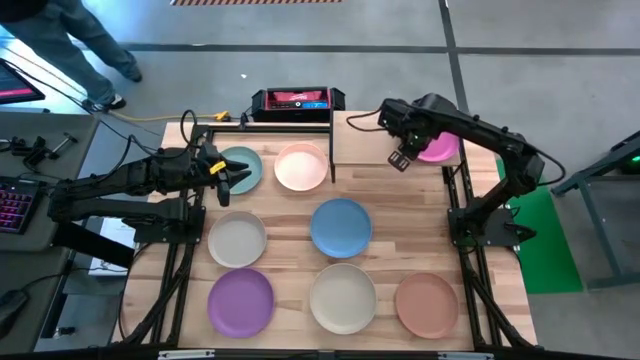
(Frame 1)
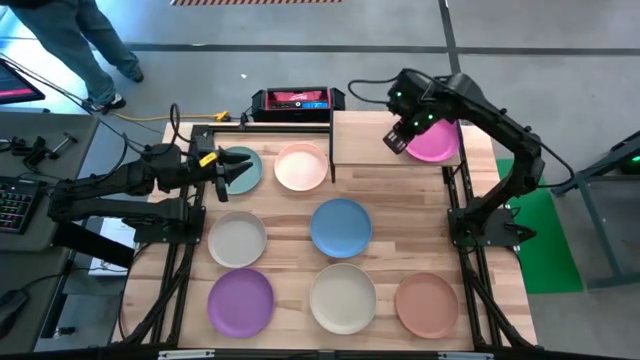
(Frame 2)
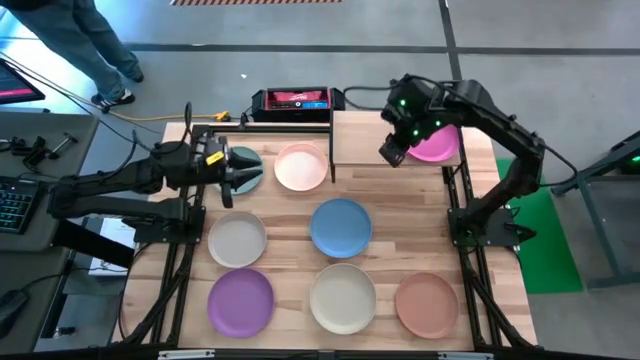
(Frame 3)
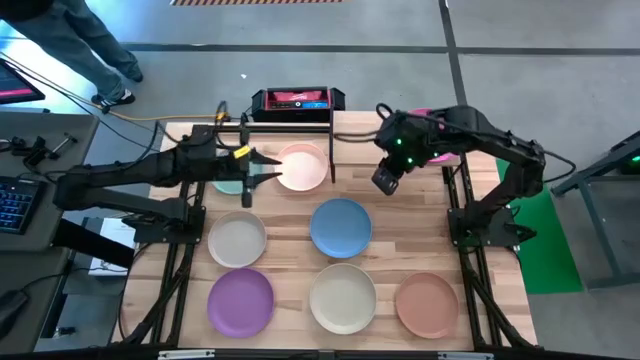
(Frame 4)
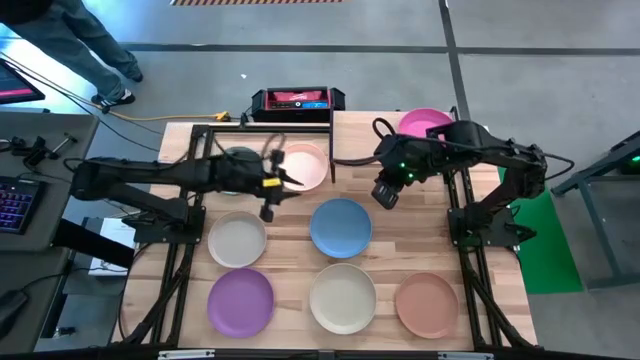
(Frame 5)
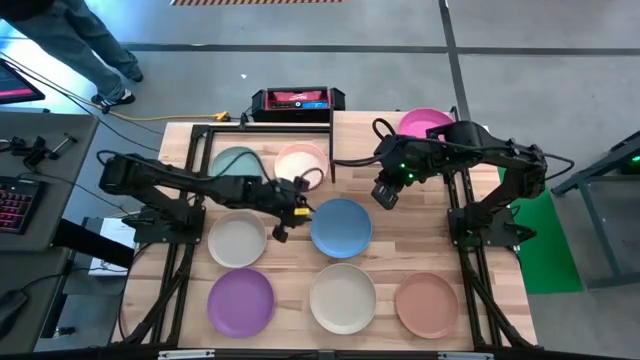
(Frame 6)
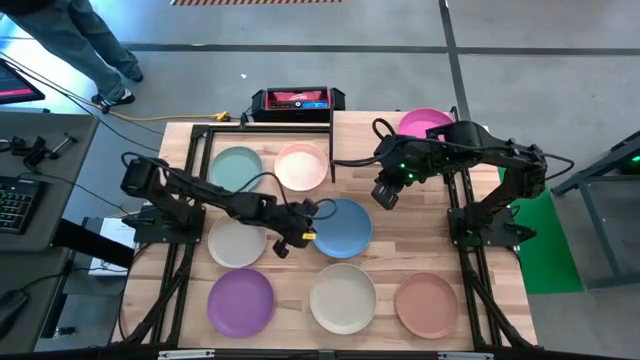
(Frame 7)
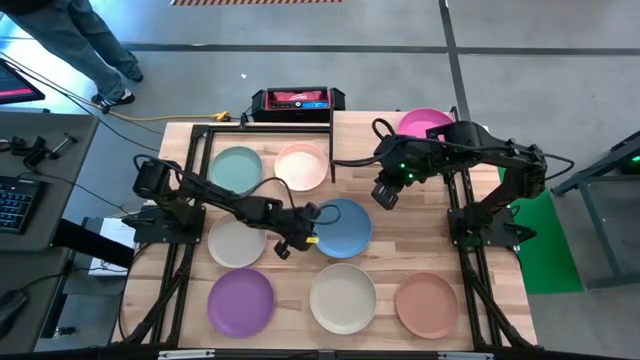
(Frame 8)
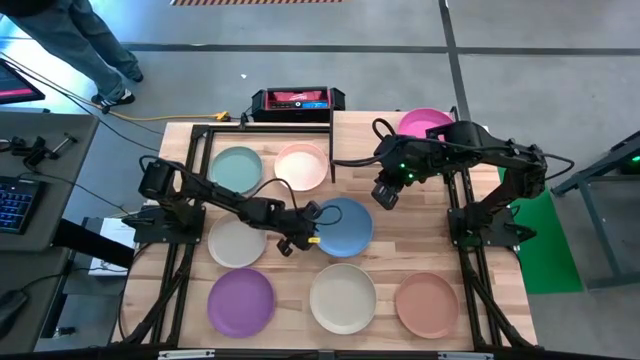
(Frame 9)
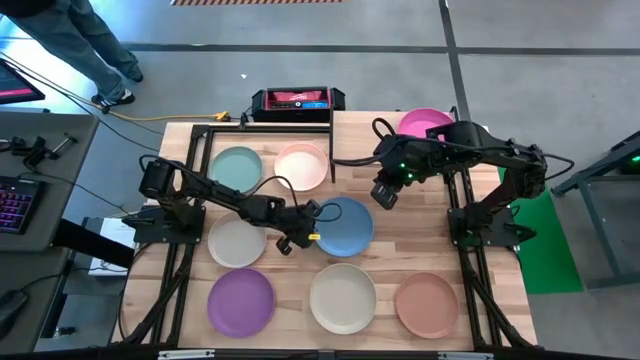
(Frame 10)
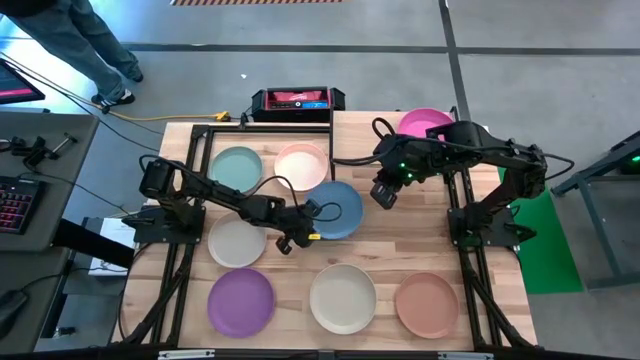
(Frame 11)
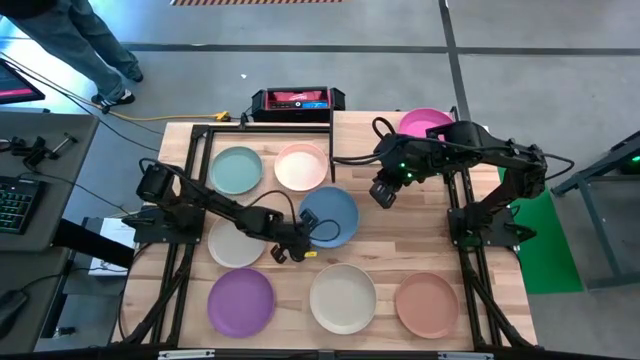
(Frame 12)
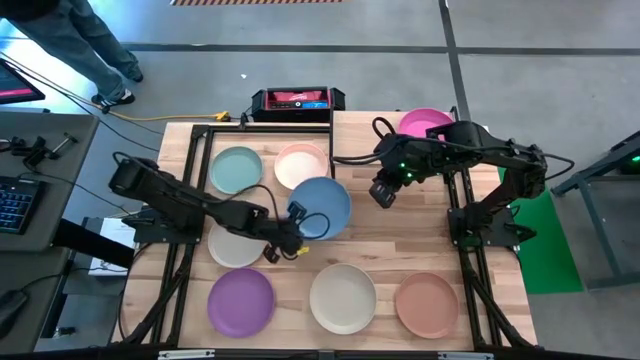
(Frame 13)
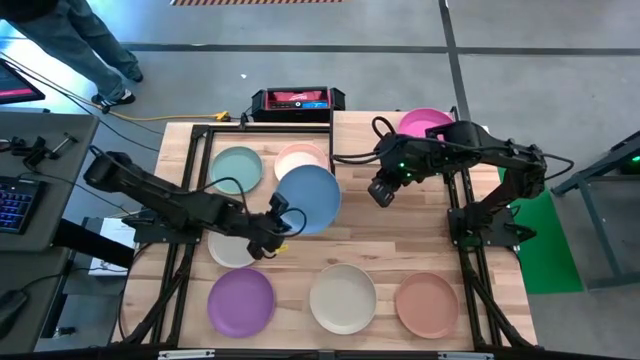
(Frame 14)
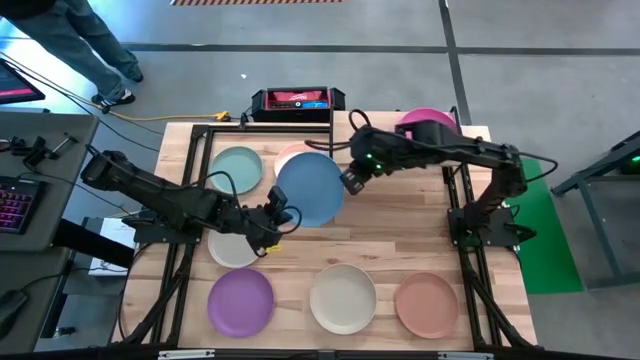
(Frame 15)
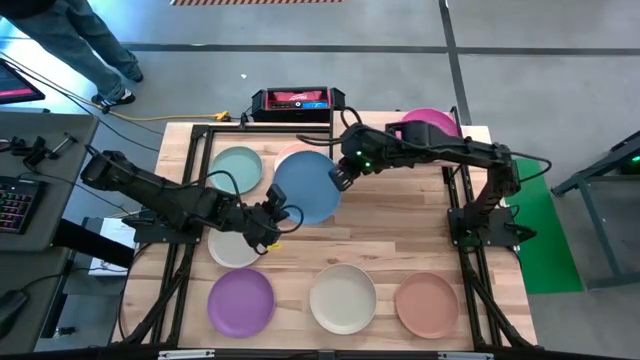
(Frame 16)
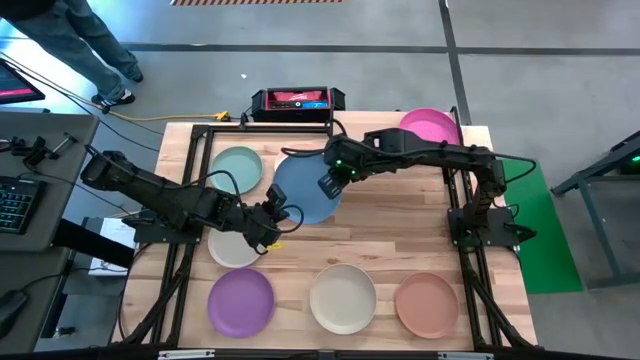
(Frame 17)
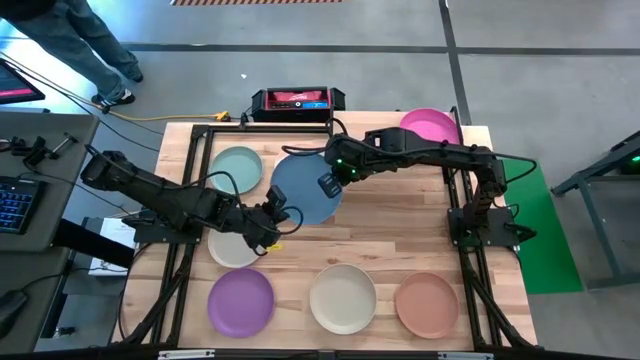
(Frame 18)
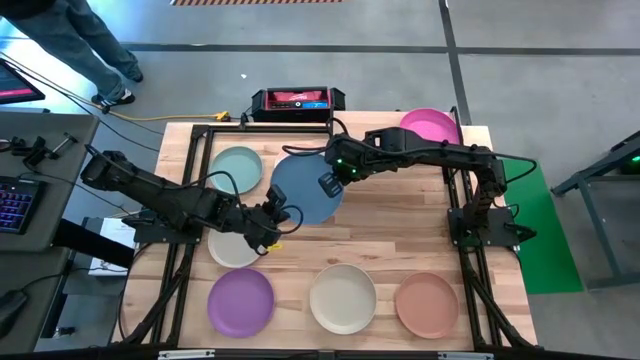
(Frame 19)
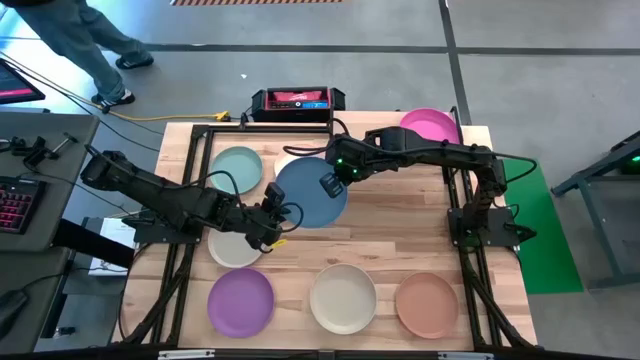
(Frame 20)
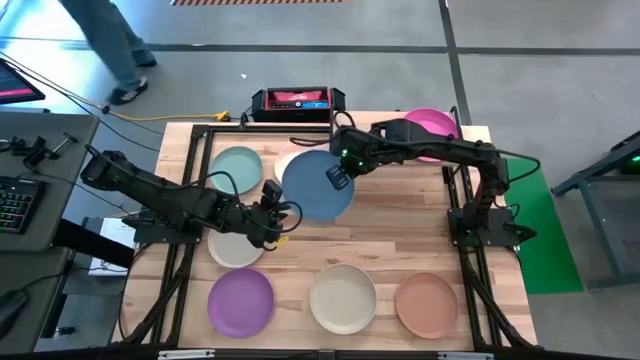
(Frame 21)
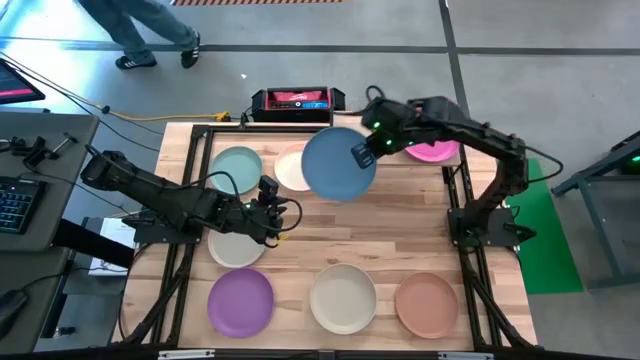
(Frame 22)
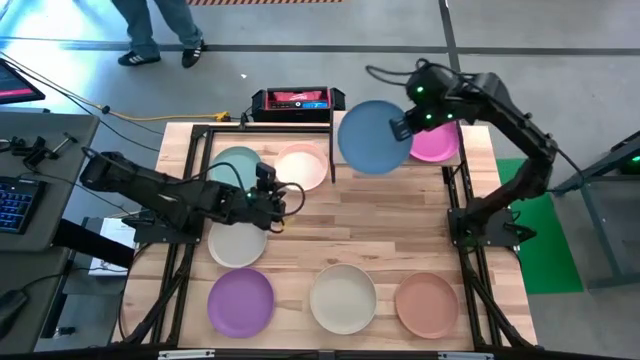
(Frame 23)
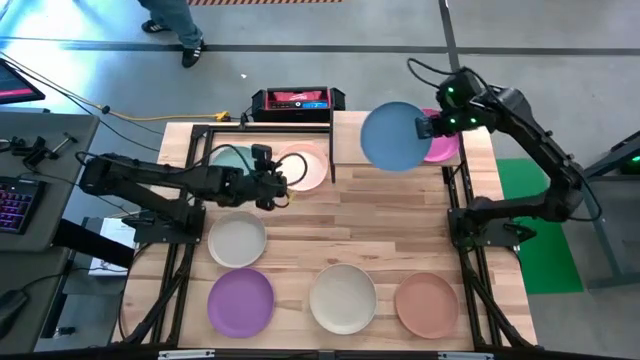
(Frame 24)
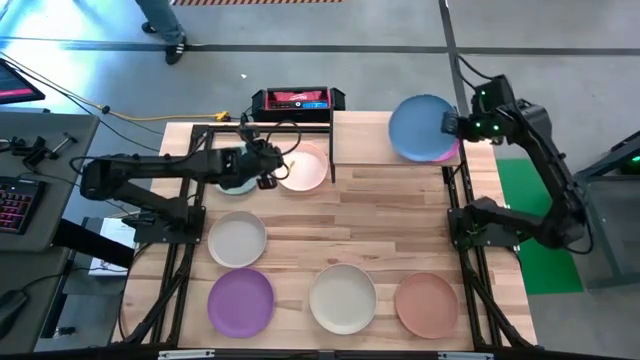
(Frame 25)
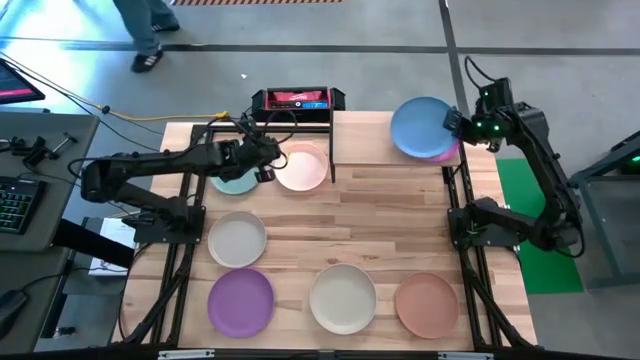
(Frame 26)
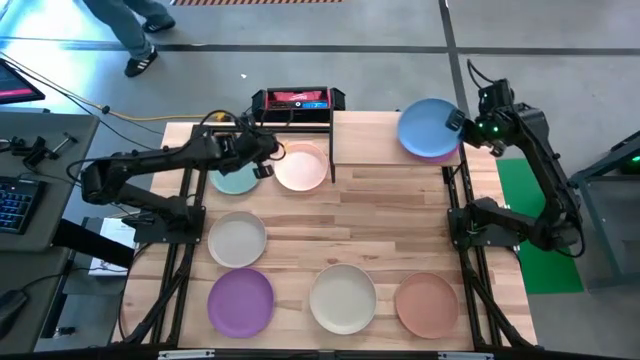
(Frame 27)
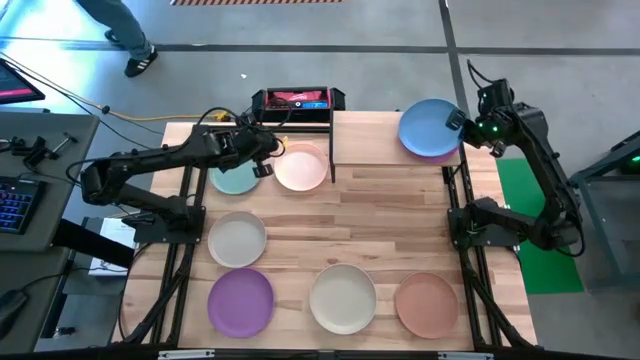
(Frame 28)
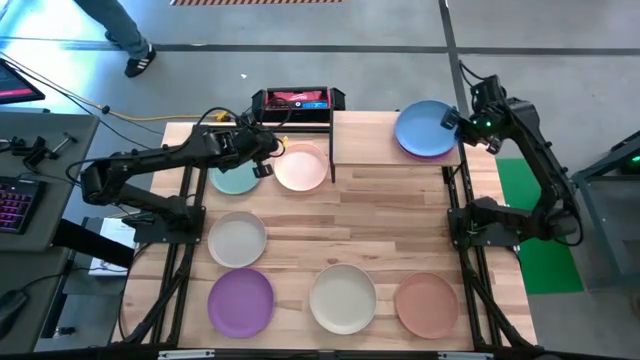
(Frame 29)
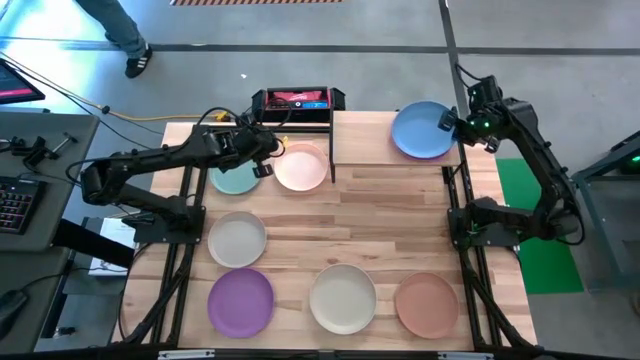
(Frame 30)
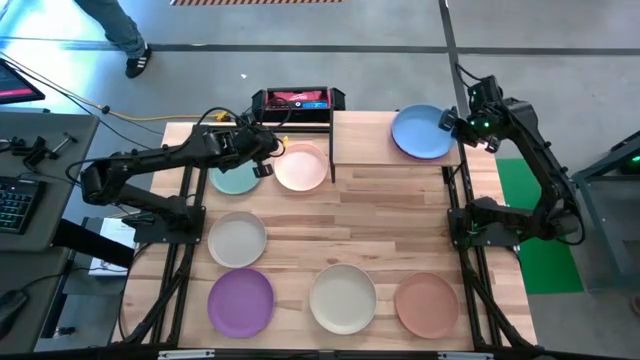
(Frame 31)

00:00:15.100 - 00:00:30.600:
Task: Place and stack plates onto a shelf
Stack the blue plate on top of the pink plate on the shelf
